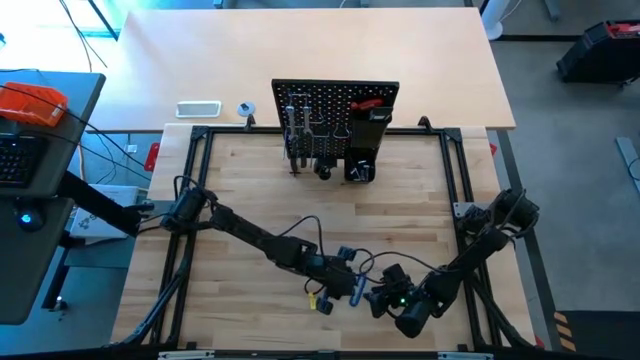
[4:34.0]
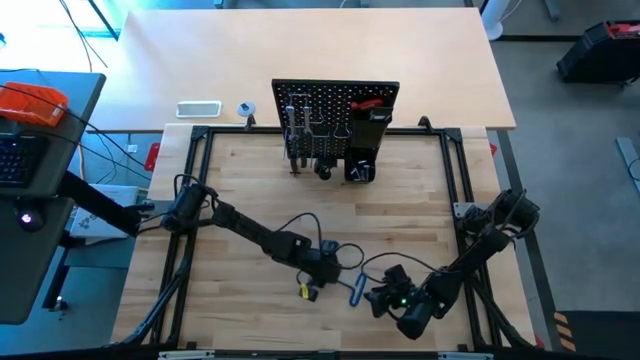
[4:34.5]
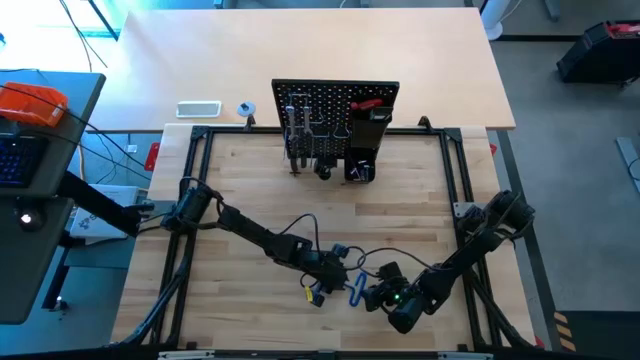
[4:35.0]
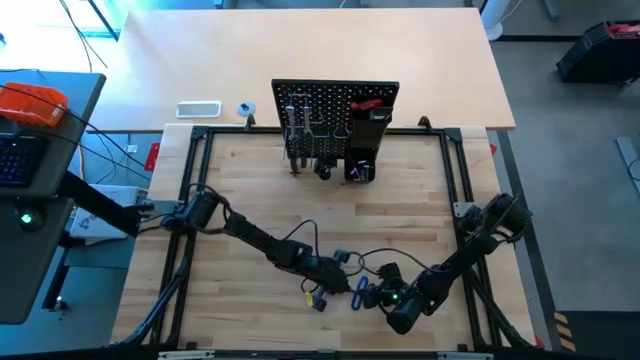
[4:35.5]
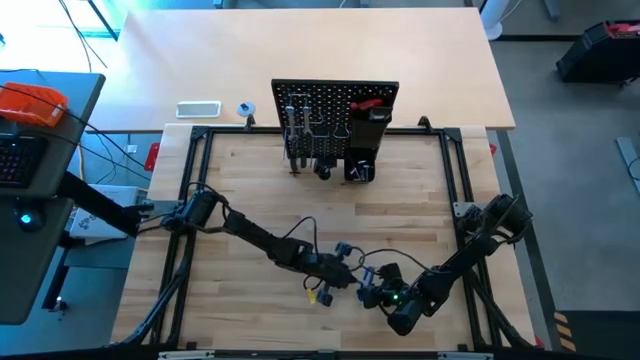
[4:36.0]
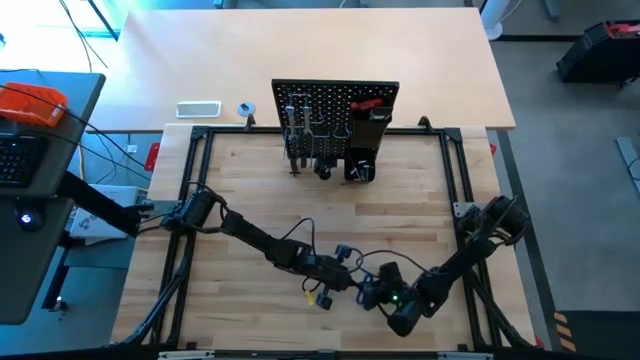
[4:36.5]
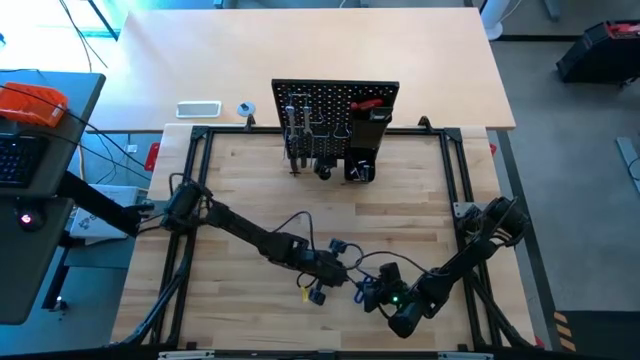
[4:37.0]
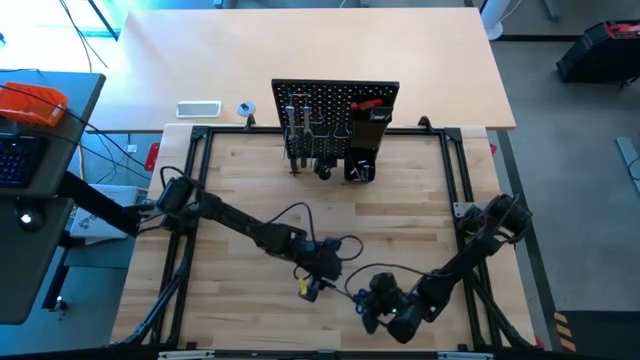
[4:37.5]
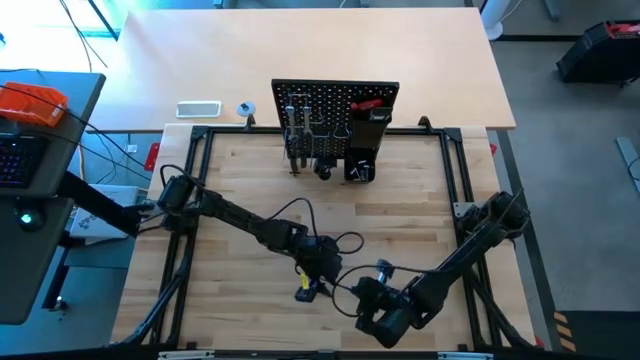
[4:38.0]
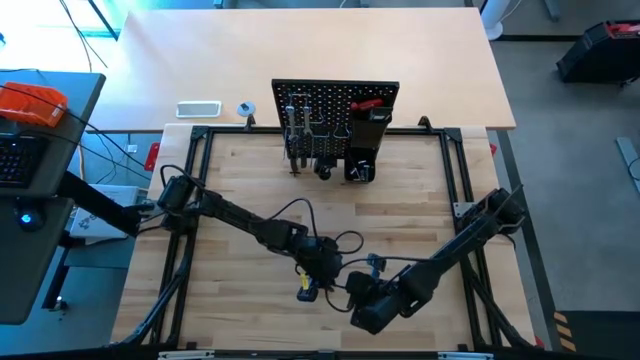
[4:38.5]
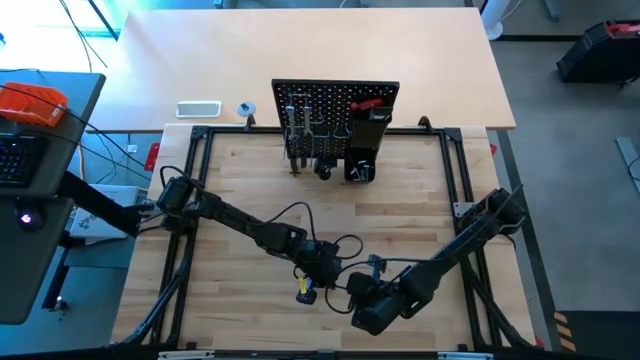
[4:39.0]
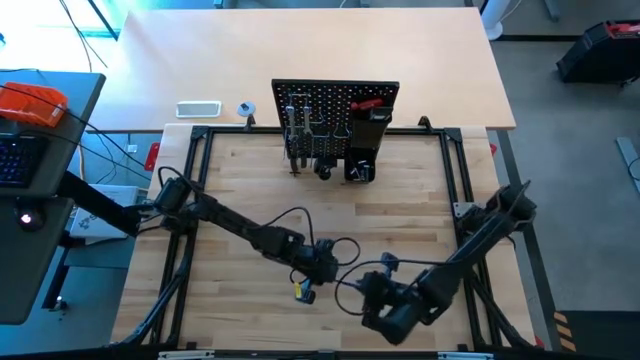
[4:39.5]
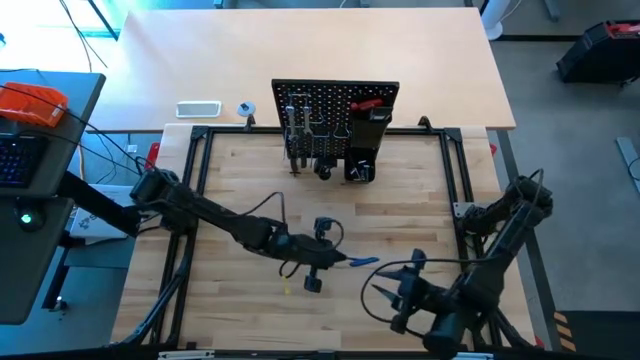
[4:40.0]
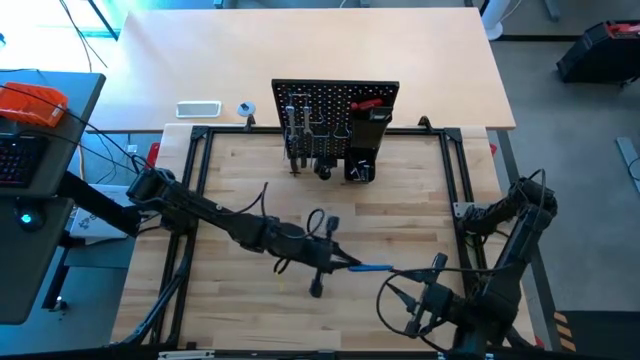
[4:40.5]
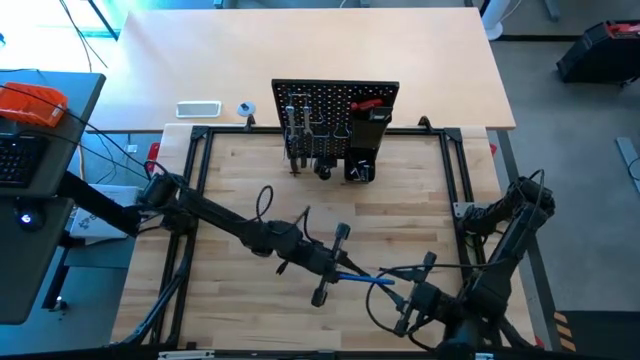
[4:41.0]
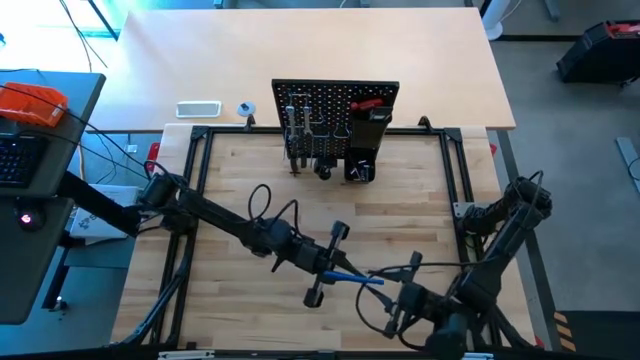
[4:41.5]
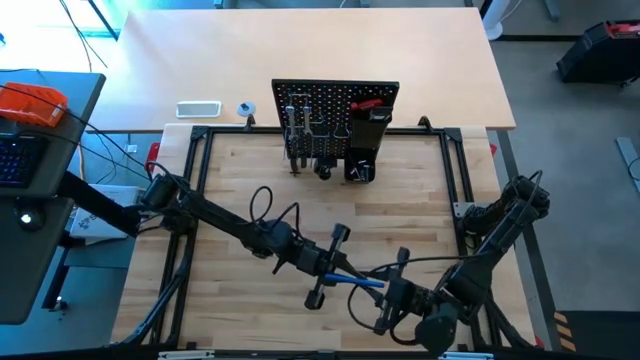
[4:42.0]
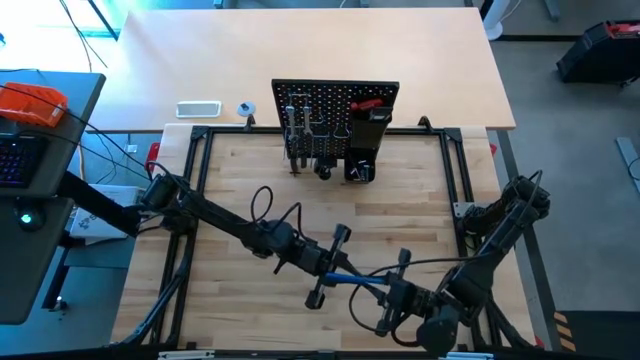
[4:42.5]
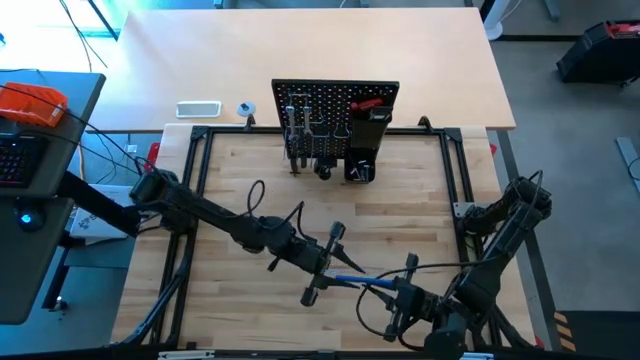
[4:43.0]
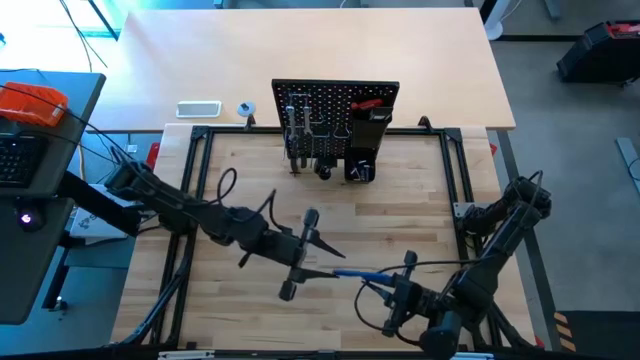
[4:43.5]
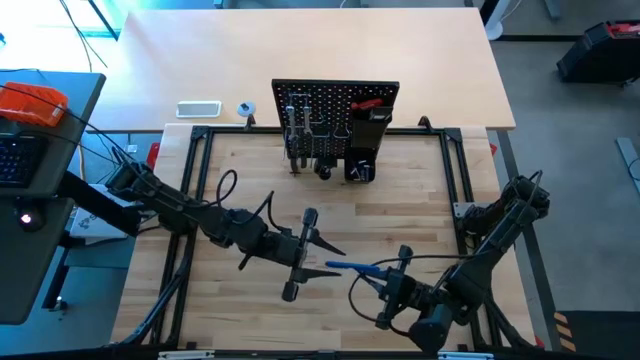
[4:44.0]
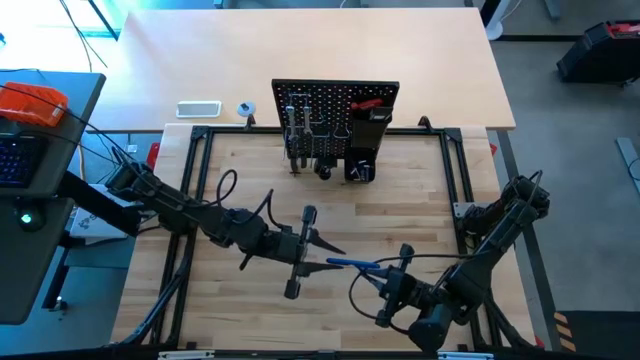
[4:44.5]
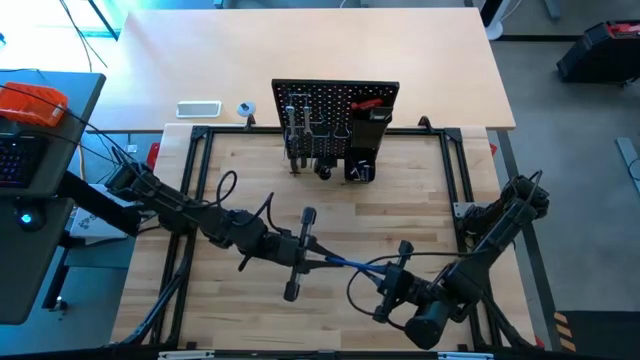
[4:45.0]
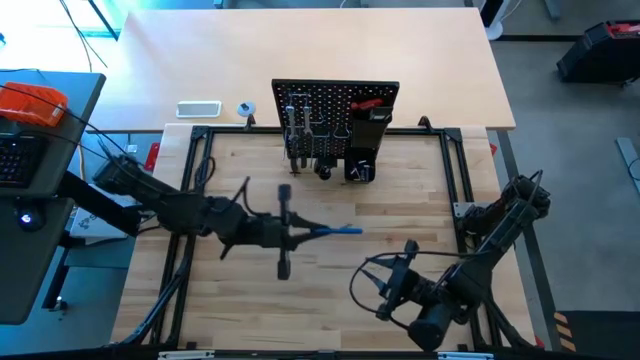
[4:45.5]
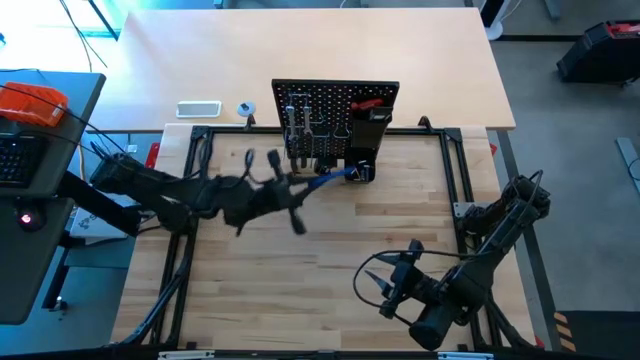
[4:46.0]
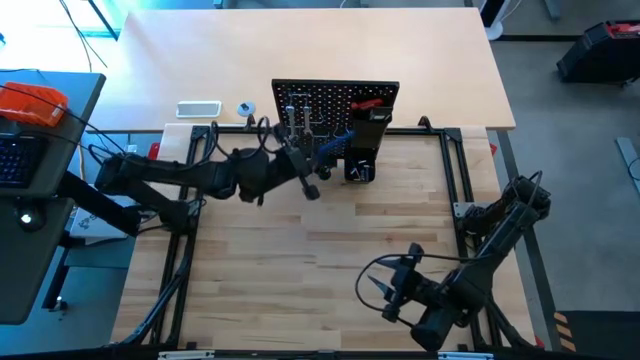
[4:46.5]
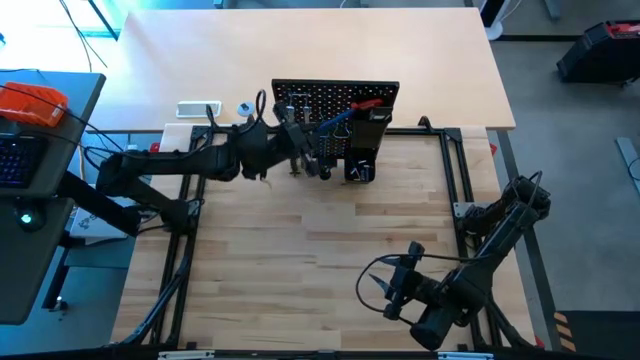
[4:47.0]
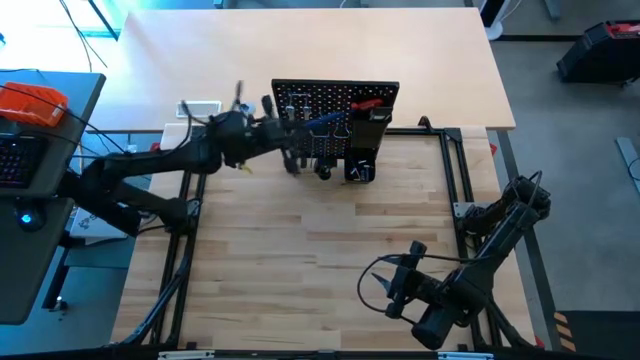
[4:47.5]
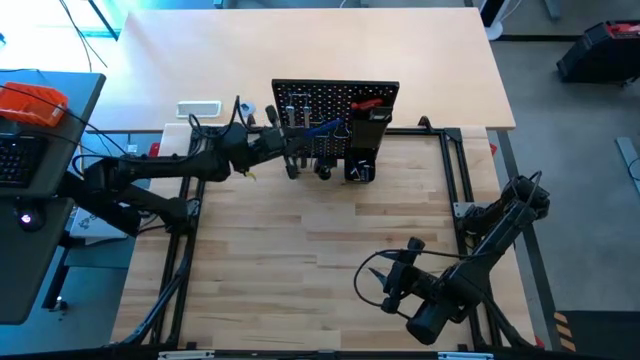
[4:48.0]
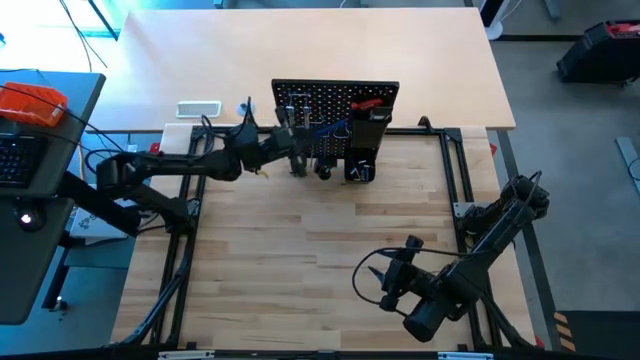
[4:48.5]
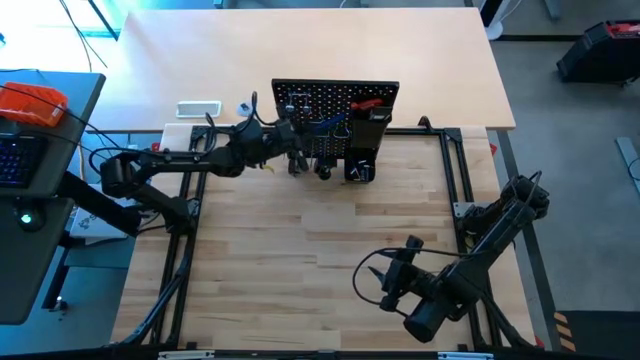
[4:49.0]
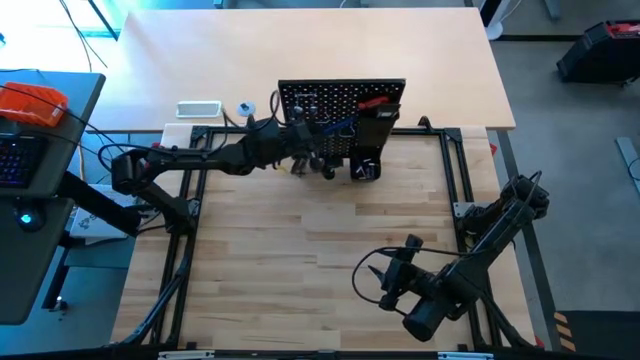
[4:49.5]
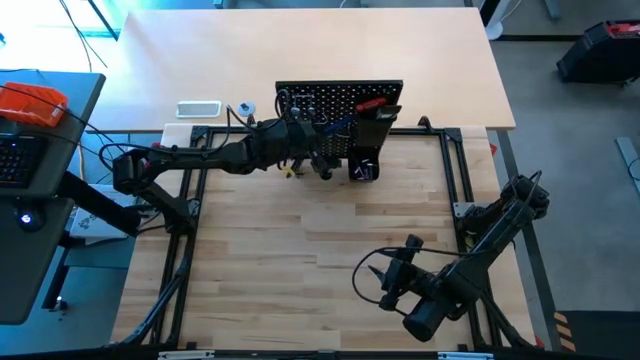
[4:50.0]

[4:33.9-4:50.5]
Task: Hang tools onto peg board
Hang the blue pick tool onto the peg board

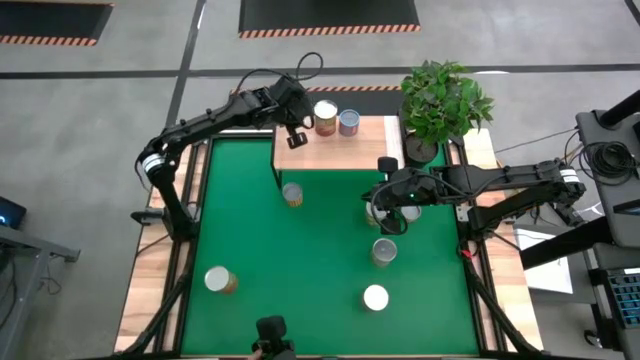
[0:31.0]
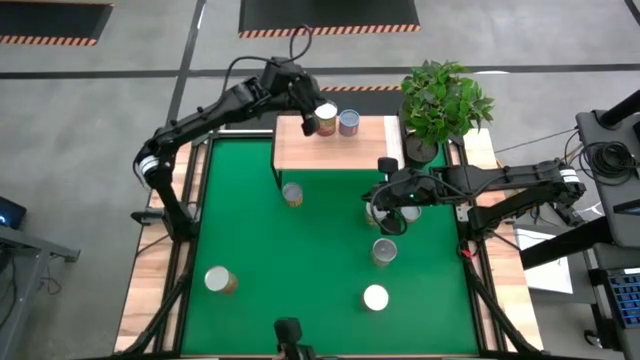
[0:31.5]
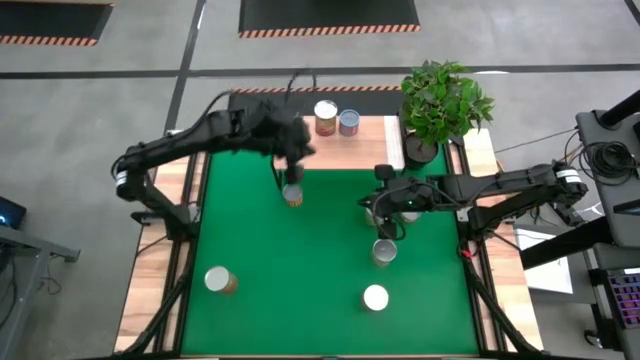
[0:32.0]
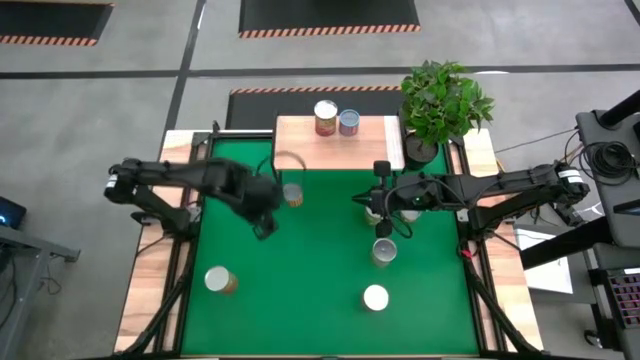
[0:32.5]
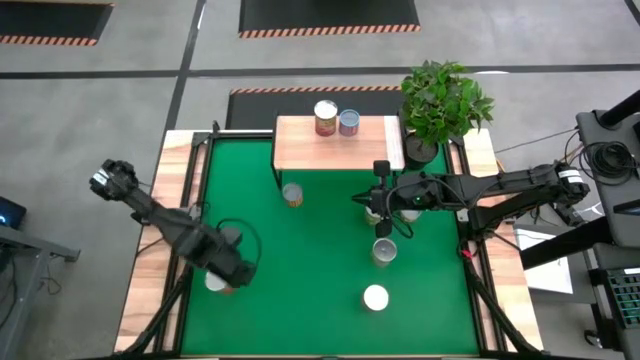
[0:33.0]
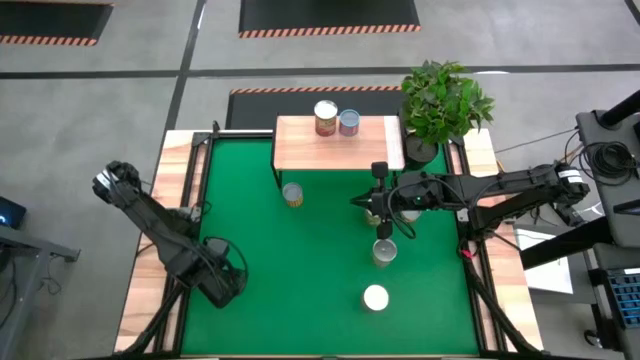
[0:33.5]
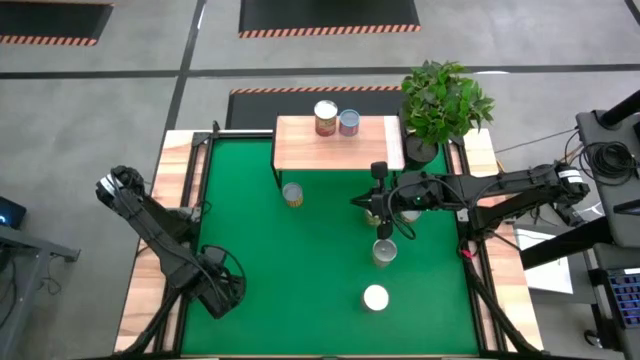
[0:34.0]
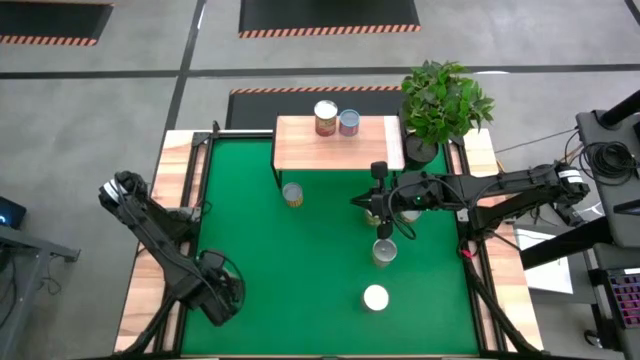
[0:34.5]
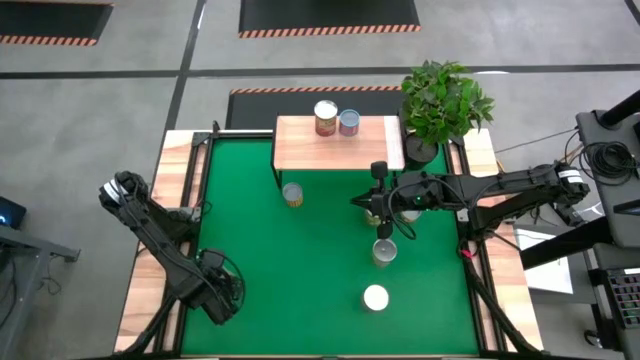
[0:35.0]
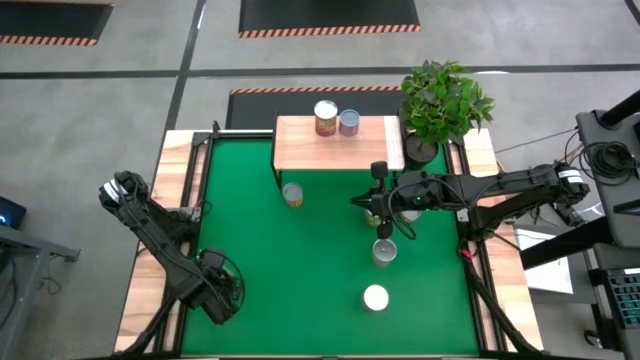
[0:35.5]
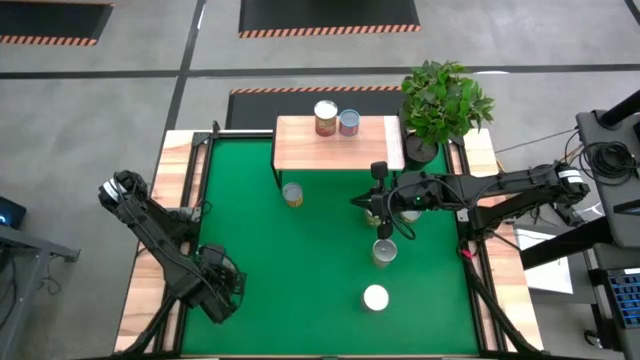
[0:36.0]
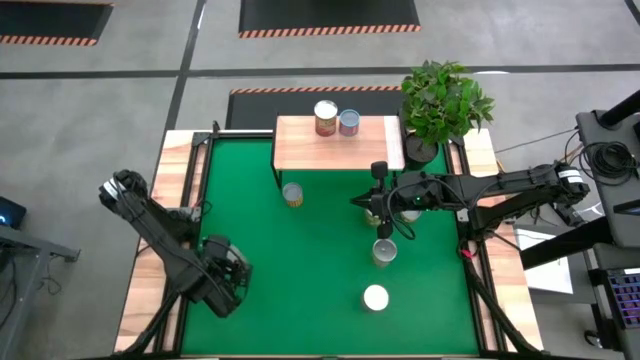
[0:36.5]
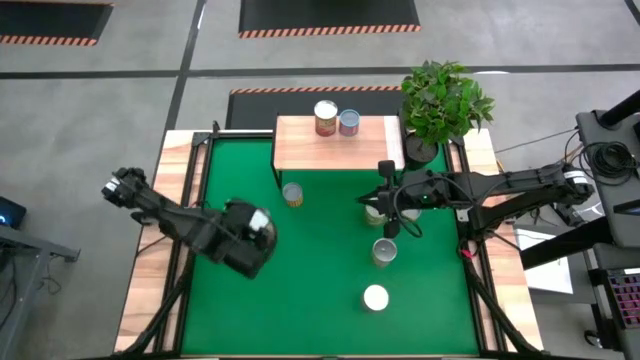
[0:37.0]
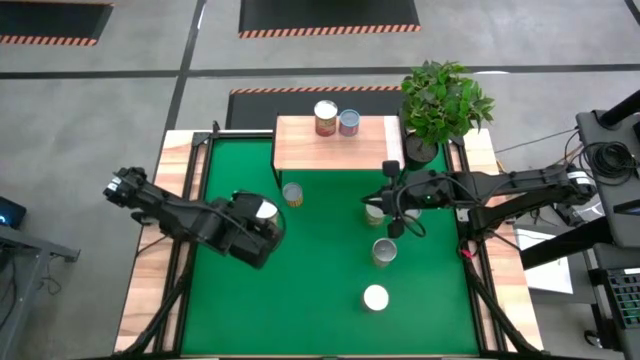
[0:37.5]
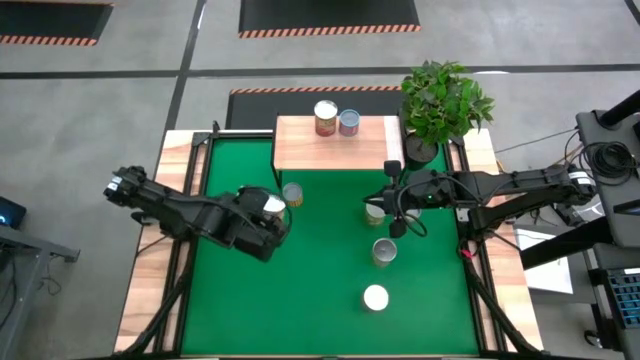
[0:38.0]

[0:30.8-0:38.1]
Task: Pick and place cans onto a shelf
Put the canned green beans on the shelf
